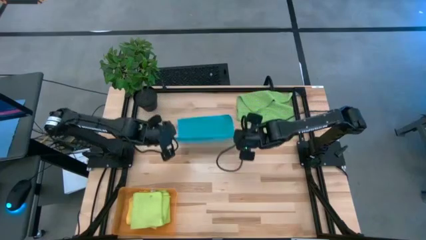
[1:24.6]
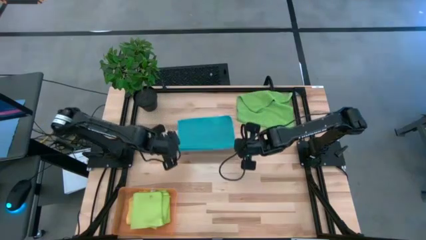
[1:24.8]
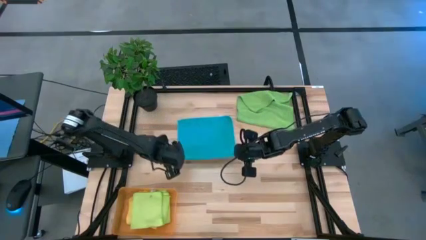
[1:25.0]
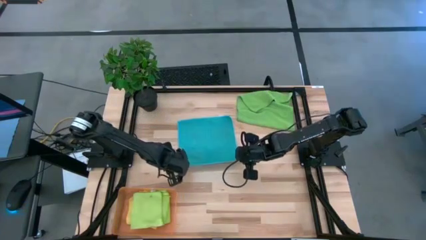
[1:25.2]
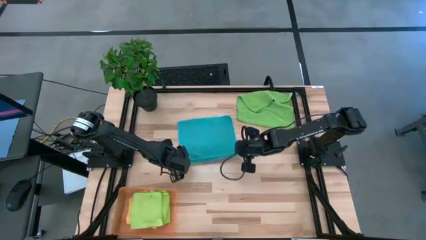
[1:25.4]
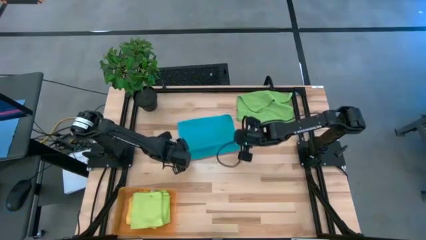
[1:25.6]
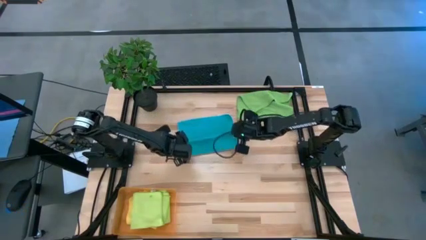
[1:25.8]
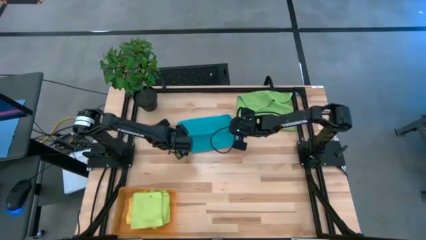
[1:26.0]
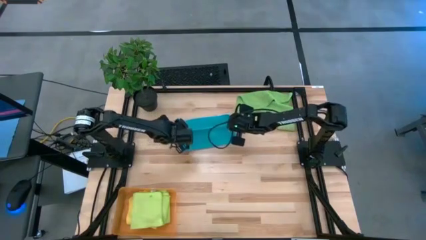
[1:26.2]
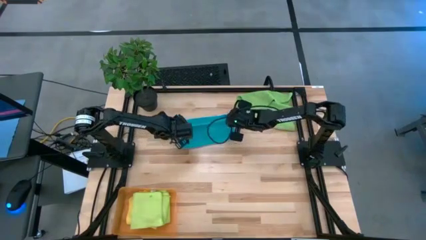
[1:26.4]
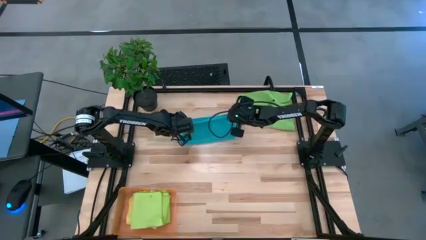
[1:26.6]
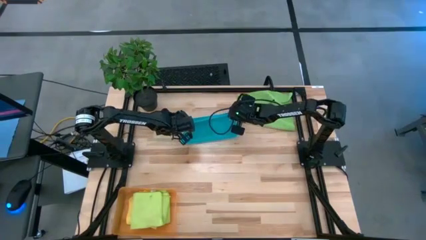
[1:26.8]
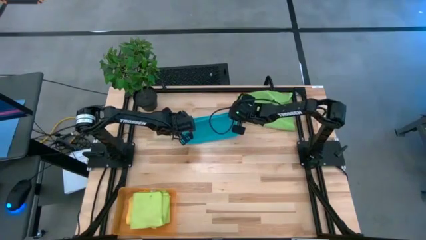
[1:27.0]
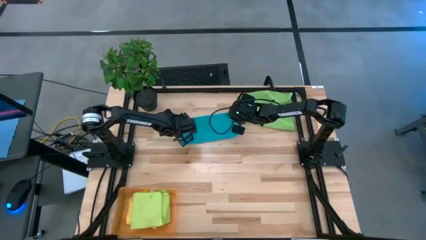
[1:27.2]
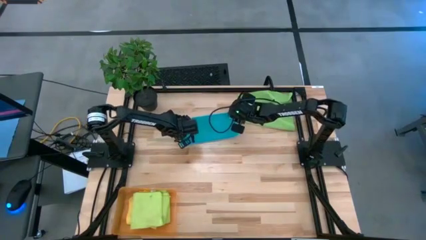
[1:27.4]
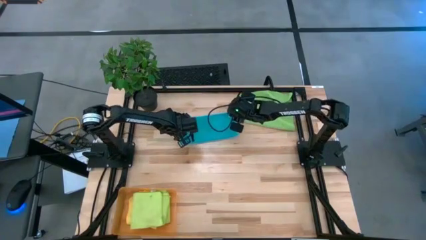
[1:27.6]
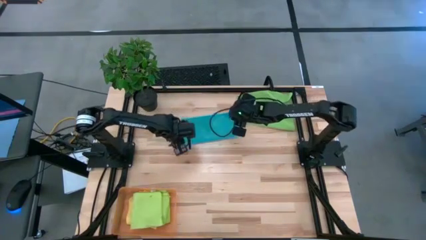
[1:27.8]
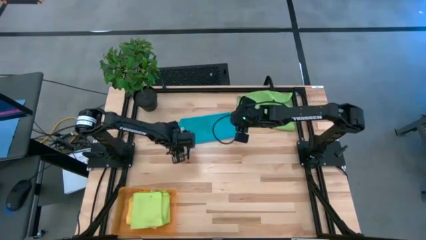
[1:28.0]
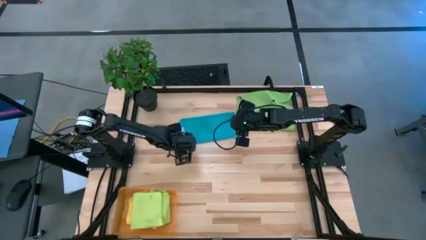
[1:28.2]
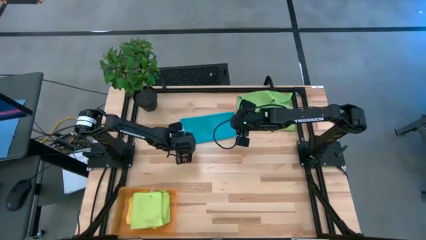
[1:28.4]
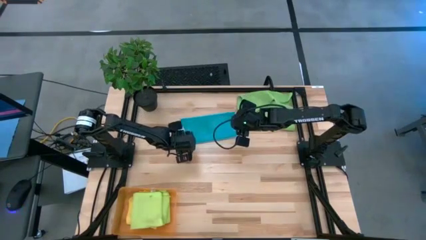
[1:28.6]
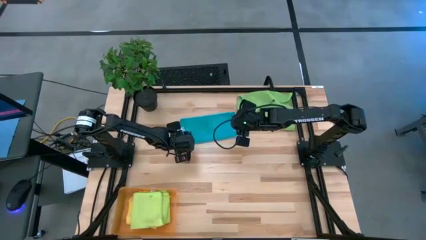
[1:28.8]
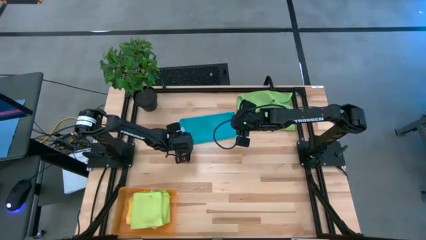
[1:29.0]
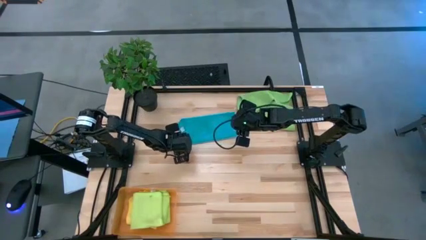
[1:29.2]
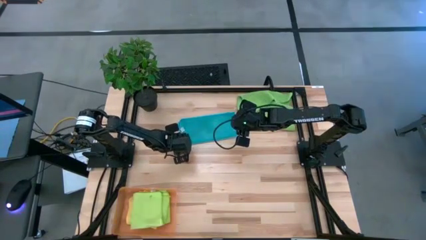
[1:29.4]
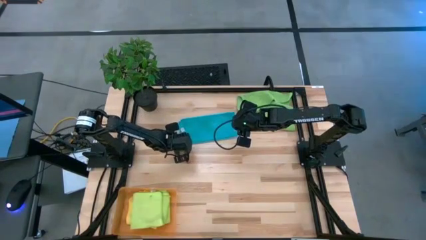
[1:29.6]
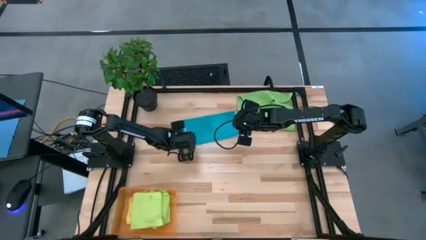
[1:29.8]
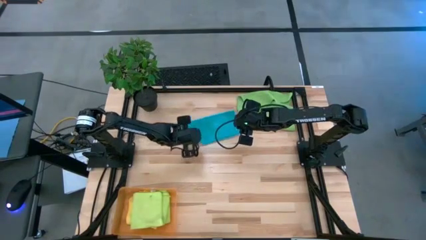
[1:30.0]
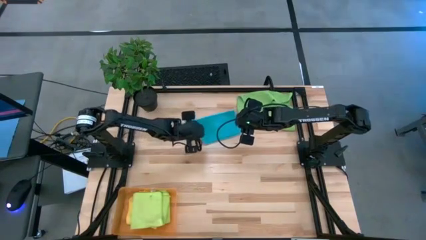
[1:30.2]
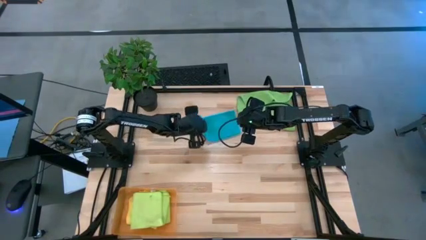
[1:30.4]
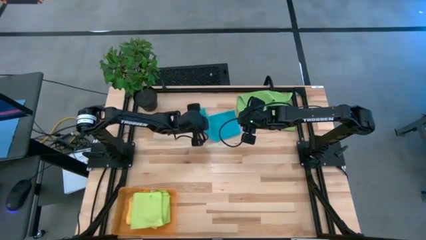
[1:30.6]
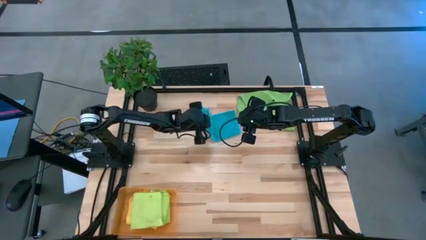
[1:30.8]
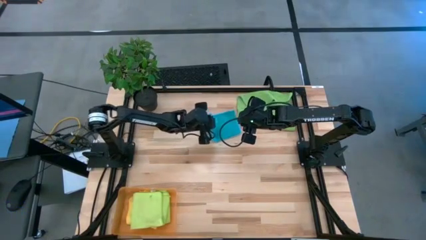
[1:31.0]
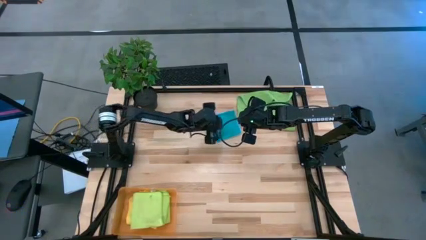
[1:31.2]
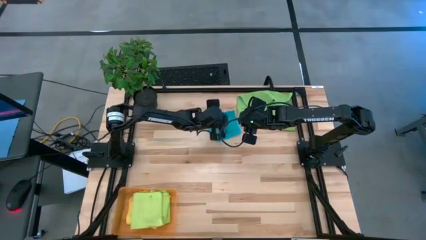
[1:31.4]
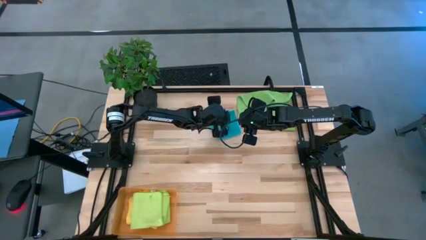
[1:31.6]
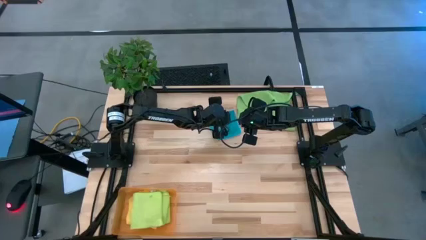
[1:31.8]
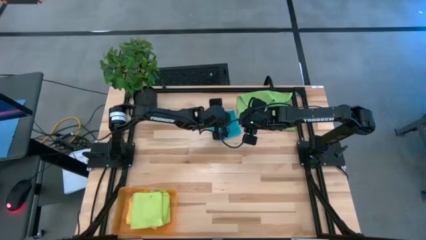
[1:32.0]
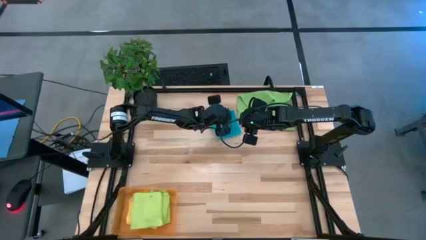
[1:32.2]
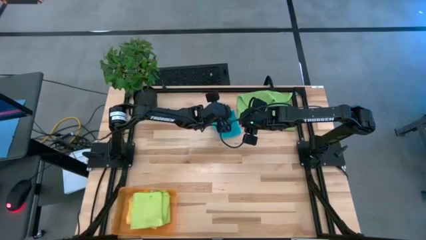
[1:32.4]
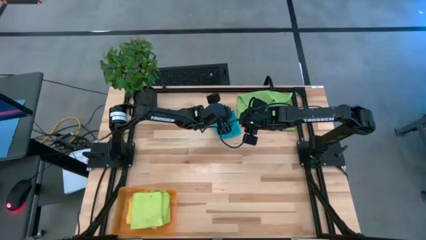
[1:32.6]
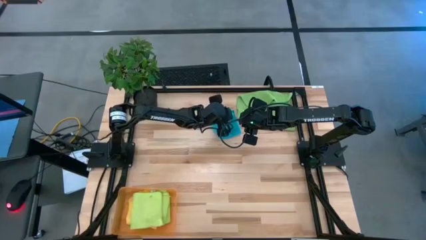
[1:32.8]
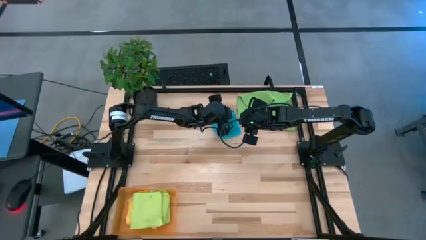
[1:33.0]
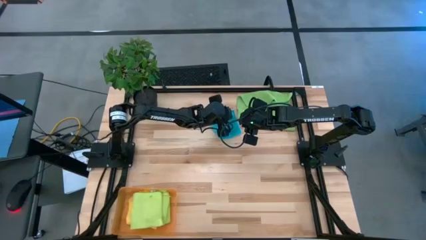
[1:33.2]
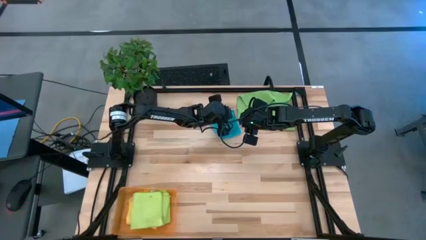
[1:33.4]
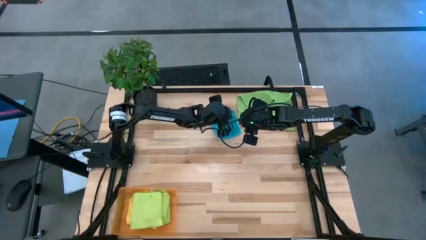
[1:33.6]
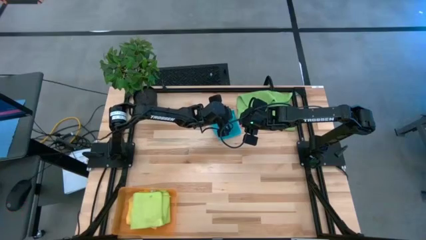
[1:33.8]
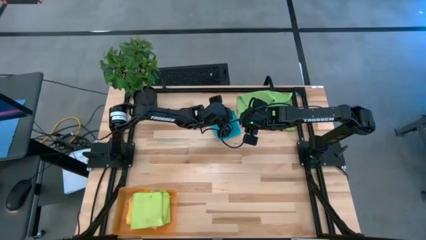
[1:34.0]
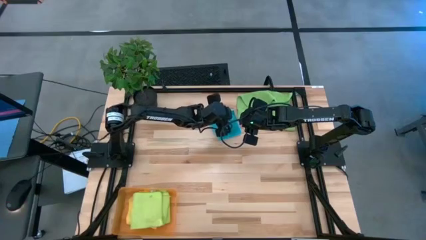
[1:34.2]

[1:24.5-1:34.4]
Task: Fold microfiber towels
Fold the blue towel

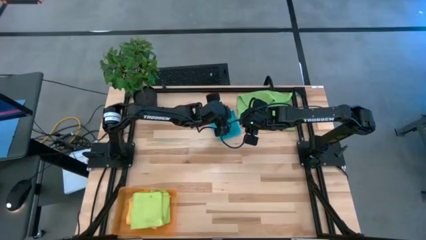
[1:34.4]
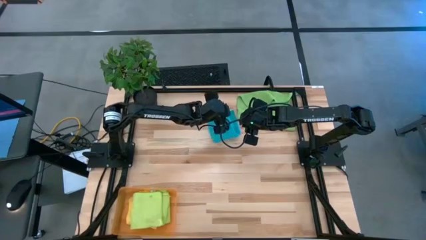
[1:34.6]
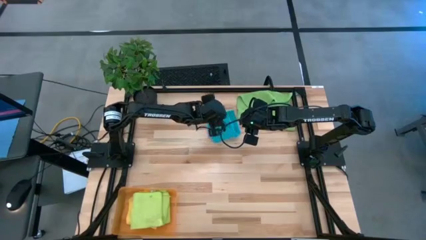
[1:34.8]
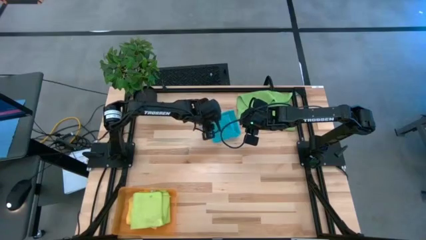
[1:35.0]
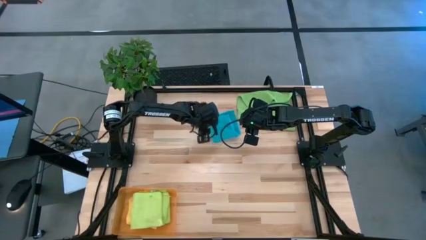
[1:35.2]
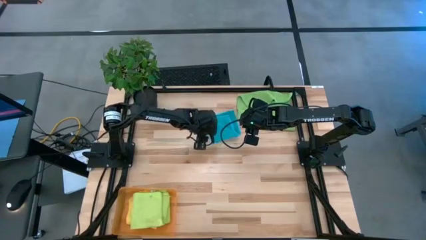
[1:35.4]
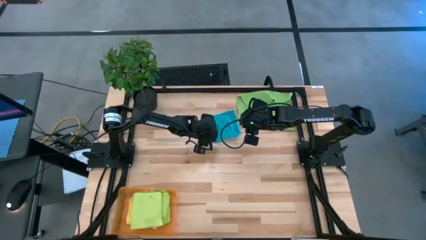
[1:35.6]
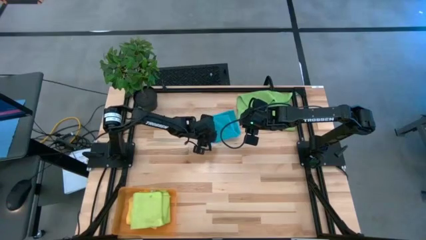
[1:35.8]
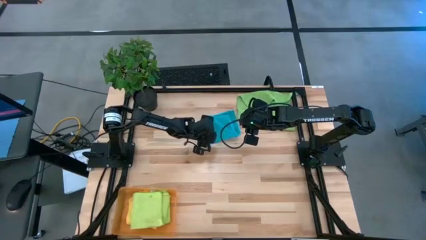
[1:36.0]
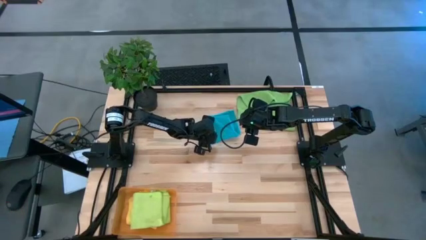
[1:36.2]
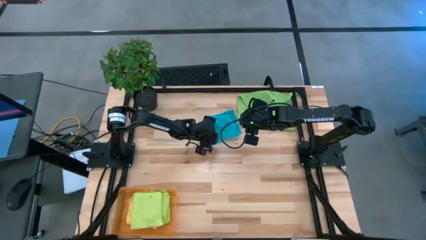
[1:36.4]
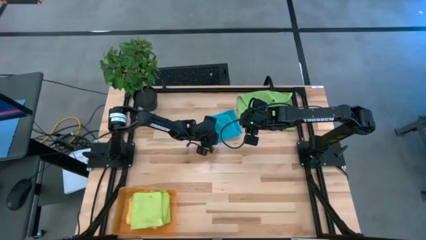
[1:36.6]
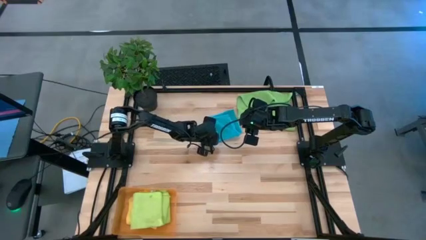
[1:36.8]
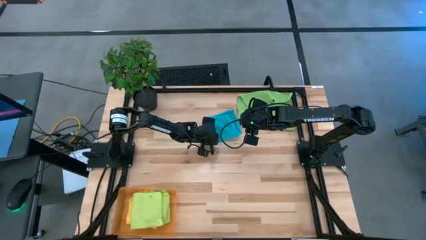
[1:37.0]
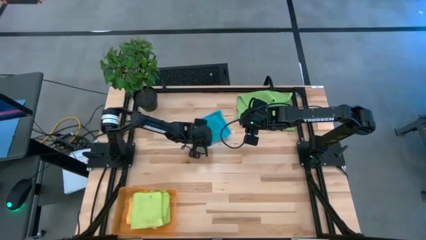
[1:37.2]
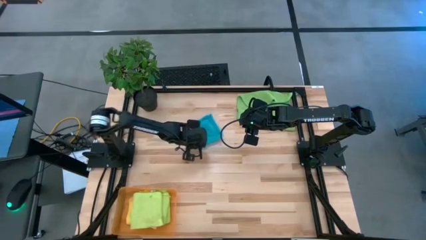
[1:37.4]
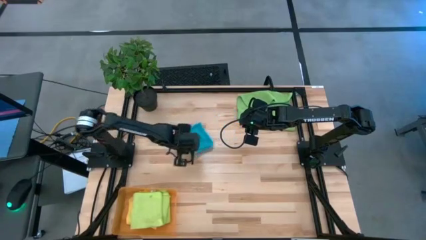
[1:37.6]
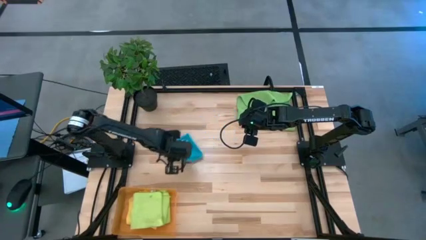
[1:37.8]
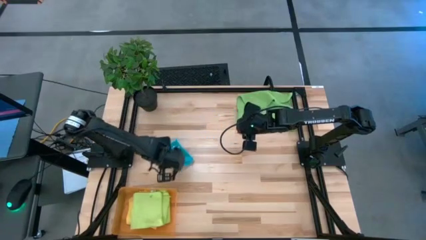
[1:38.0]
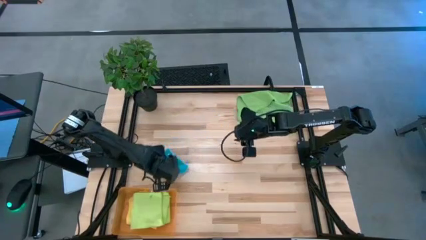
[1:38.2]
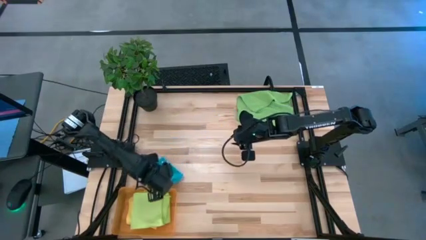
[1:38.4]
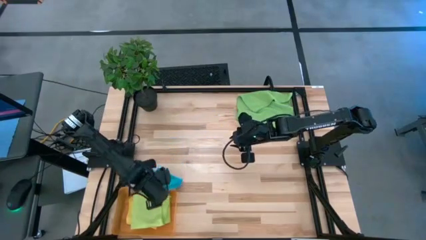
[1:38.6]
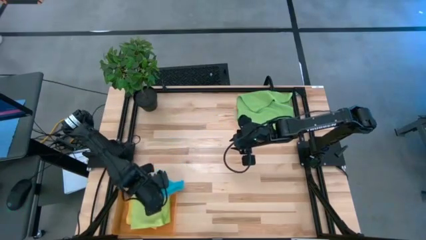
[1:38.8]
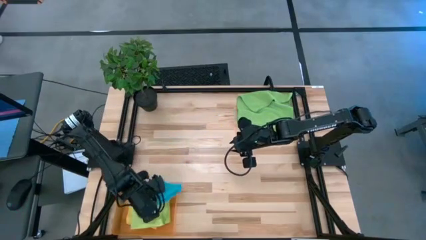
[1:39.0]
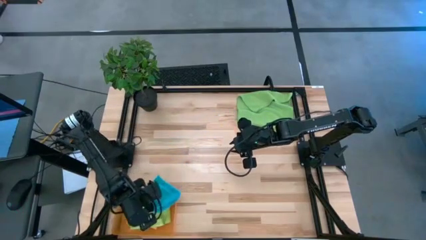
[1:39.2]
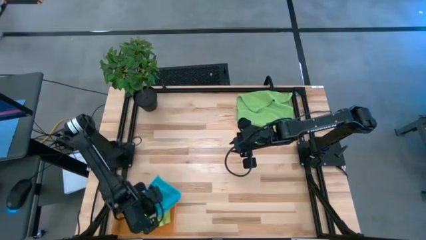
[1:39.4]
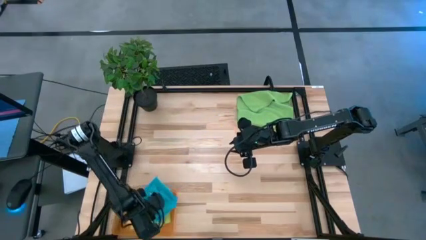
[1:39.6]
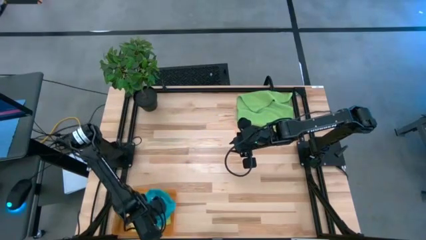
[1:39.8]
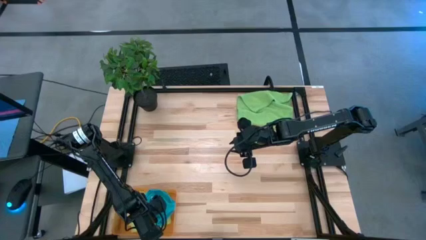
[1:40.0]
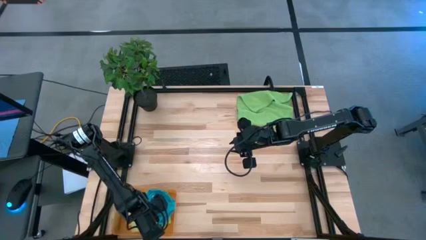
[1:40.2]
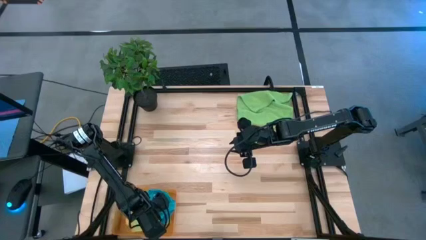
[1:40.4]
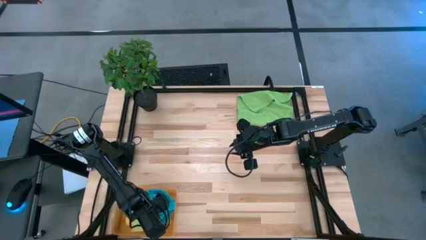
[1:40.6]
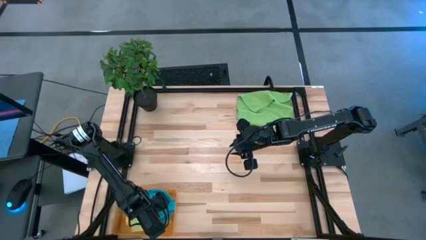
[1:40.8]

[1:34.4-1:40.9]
Put the blue towel into the orange bin
